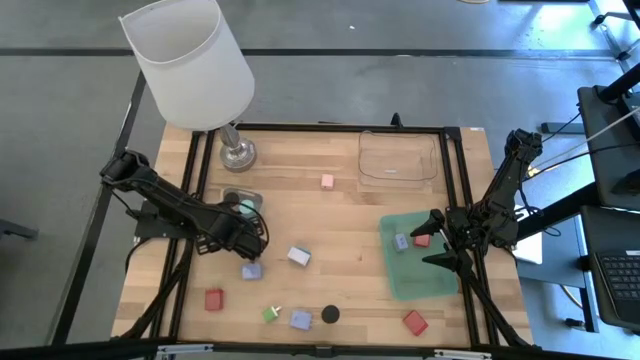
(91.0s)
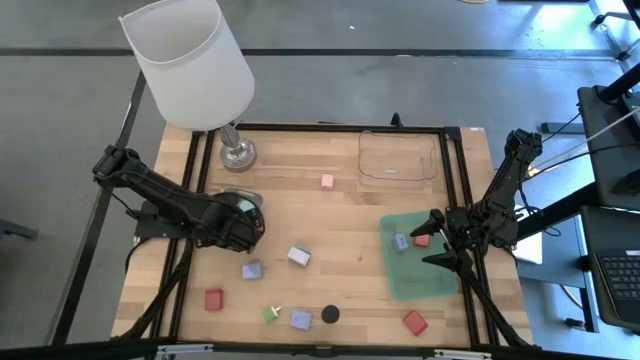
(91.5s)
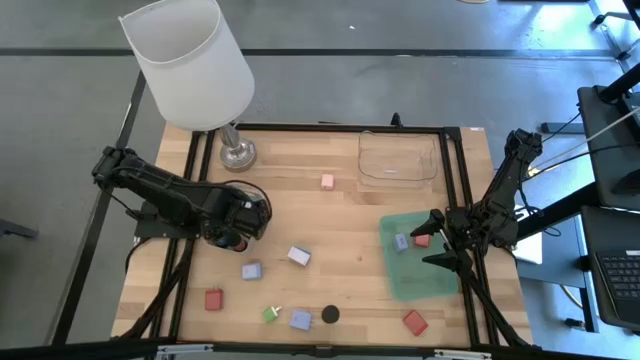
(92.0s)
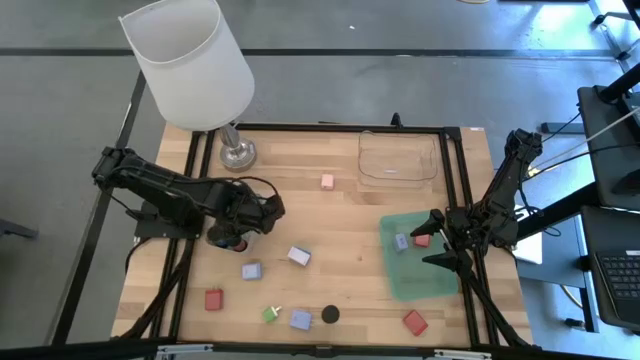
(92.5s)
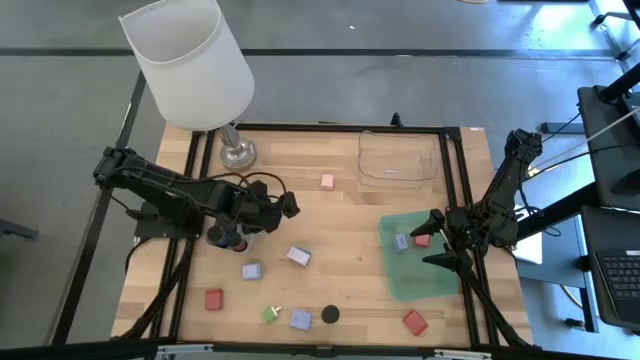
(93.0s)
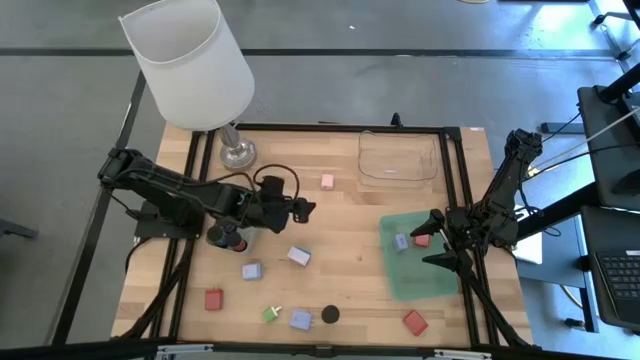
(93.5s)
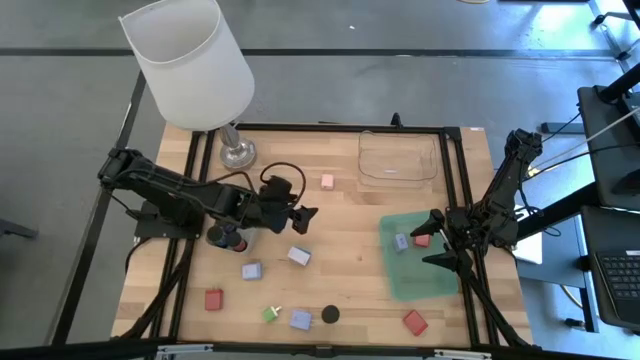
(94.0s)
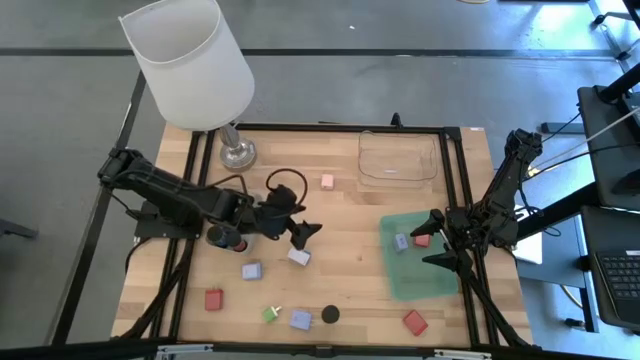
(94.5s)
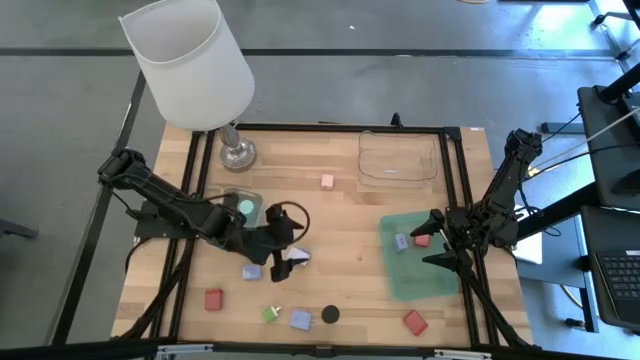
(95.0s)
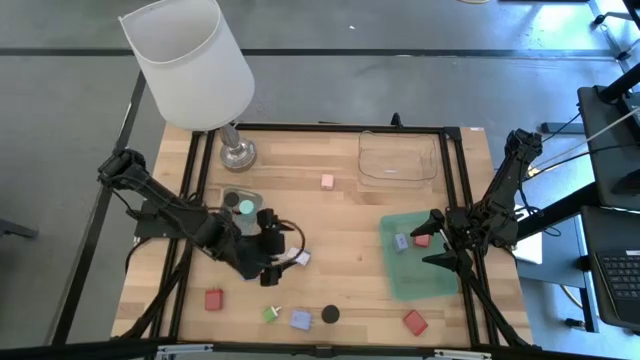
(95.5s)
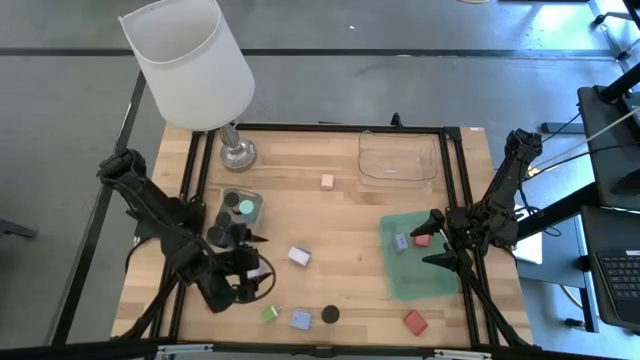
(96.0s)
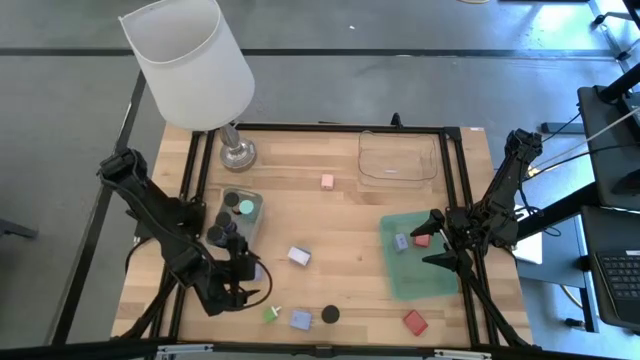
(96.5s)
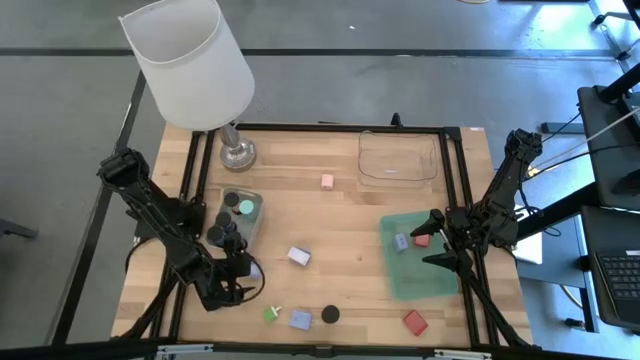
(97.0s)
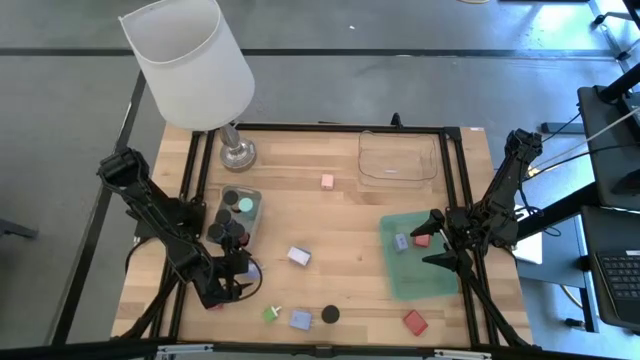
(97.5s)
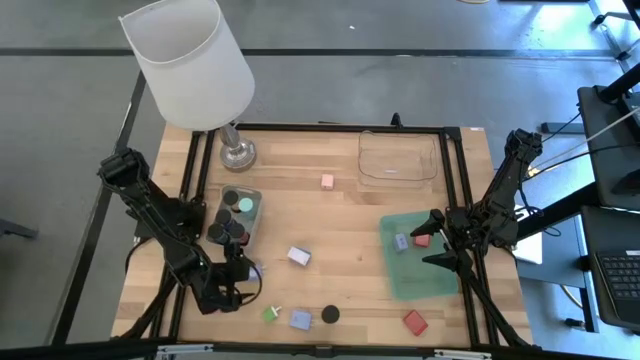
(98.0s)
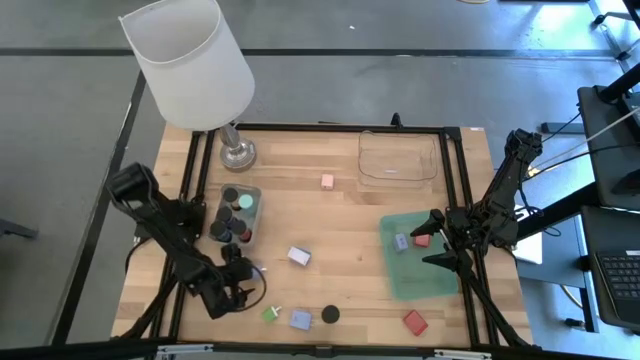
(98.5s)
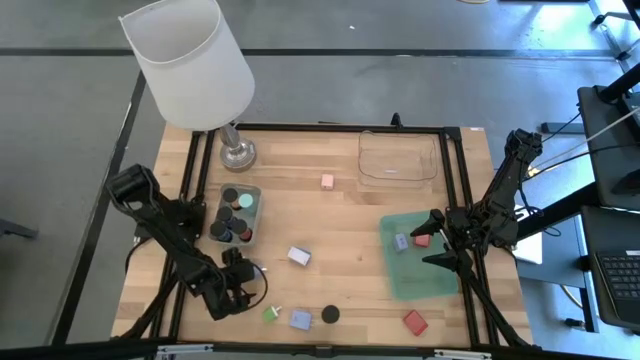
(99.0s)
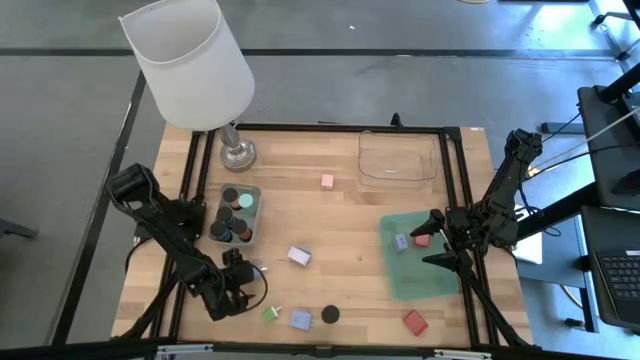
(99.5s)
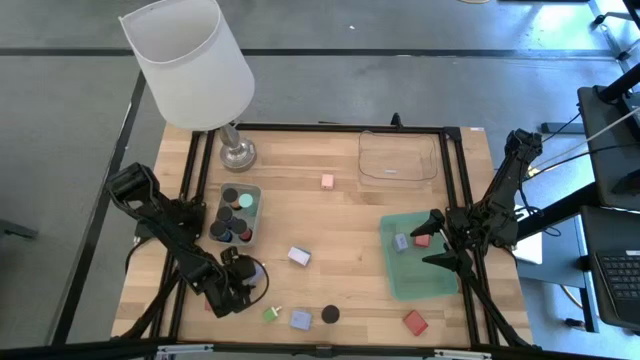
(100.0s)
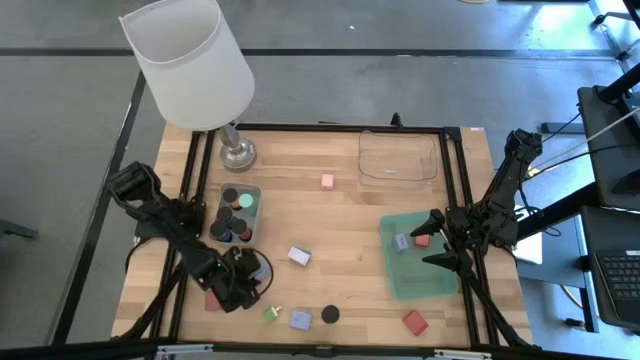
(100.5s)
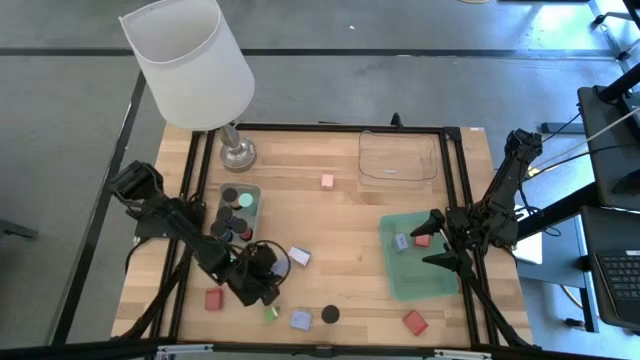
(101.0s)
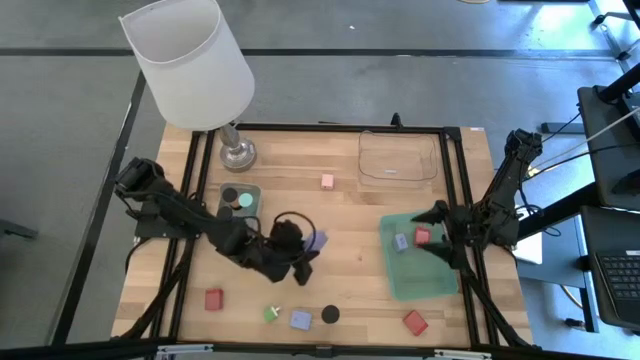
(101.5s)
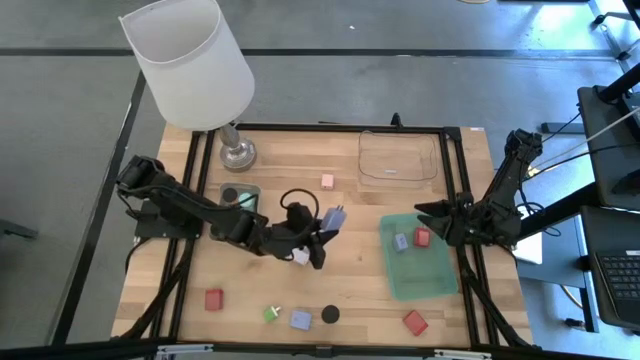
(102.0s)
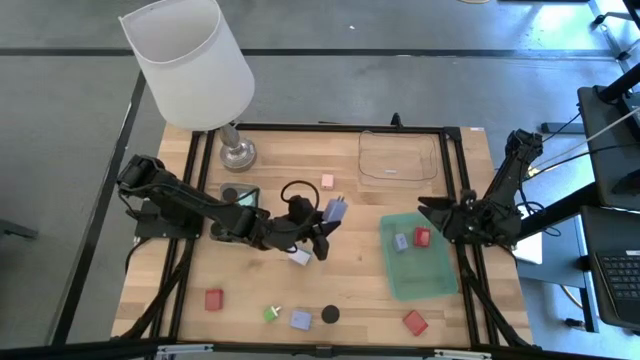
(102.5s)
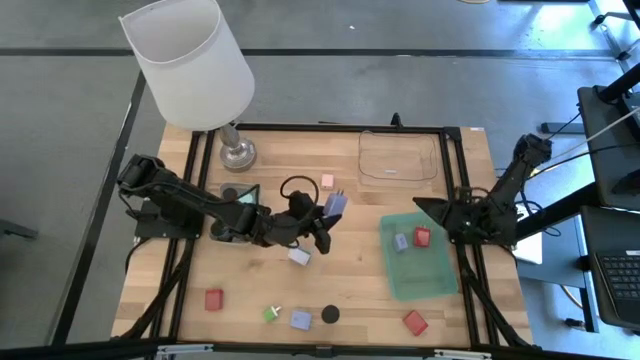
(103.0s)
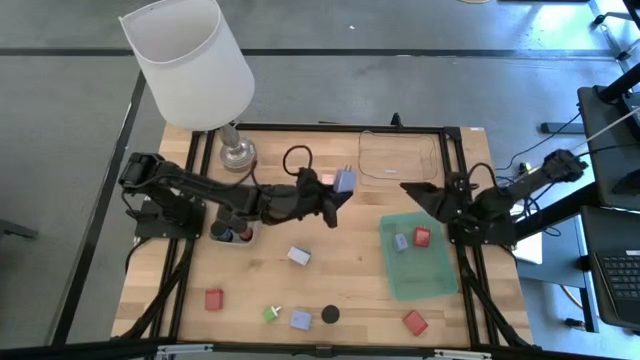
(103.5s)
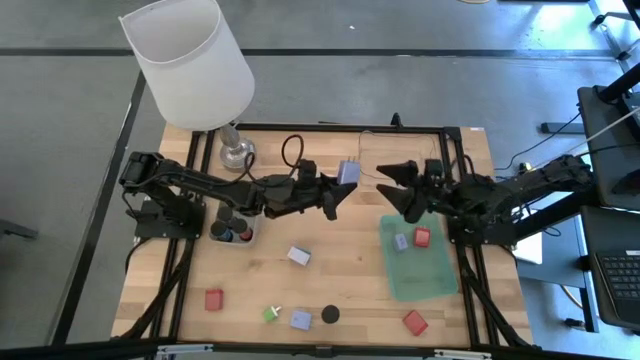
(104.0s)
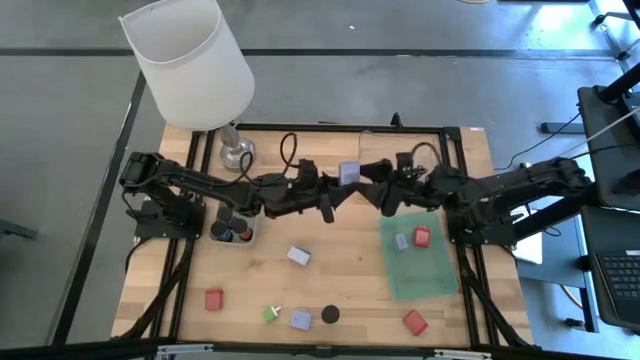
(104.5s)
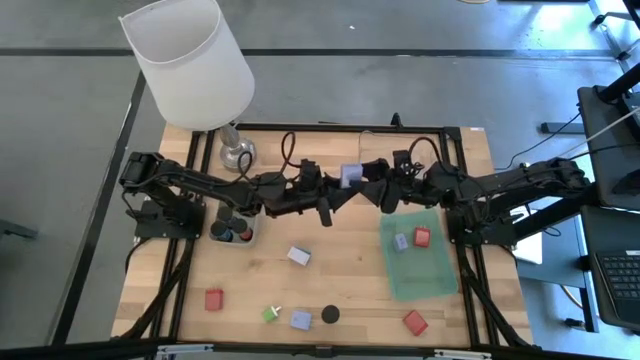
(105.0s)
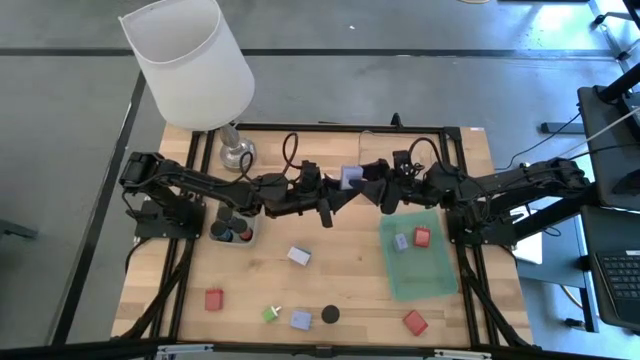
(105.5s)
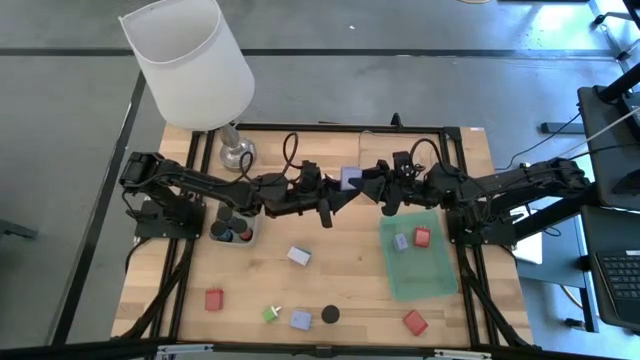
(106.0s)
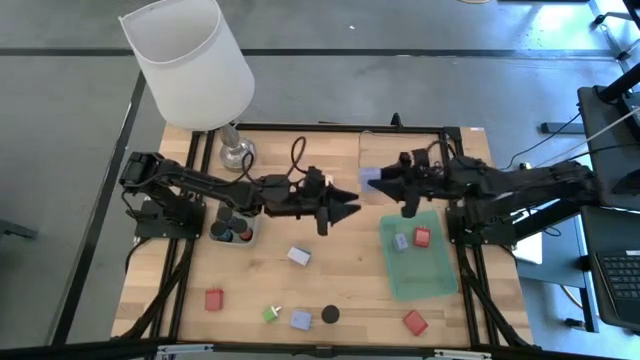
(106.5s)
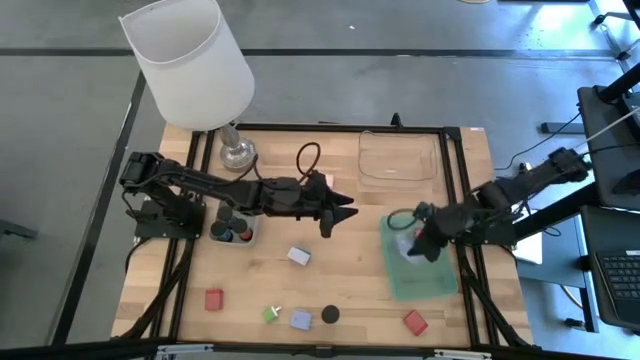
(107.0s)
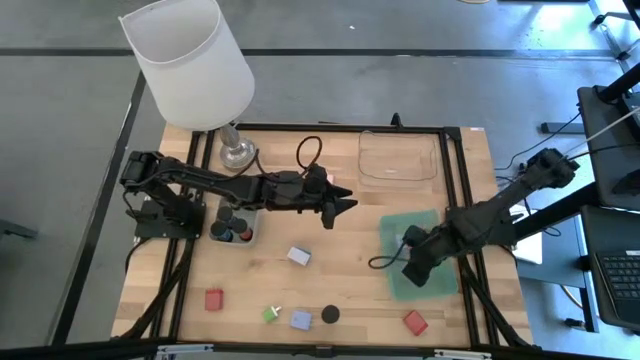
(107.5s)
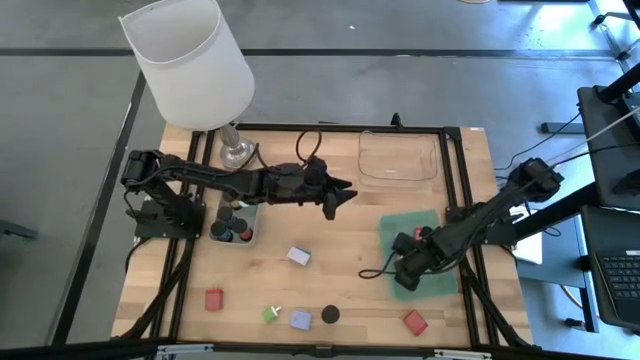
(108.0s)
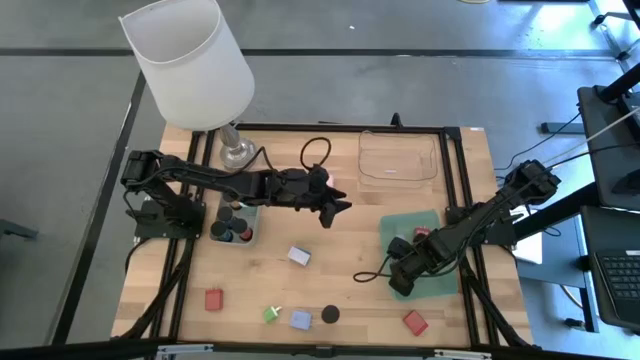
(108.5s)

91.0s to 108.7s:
Task: Pick & Place Office items
Put the top blue charger adapter into the green bin

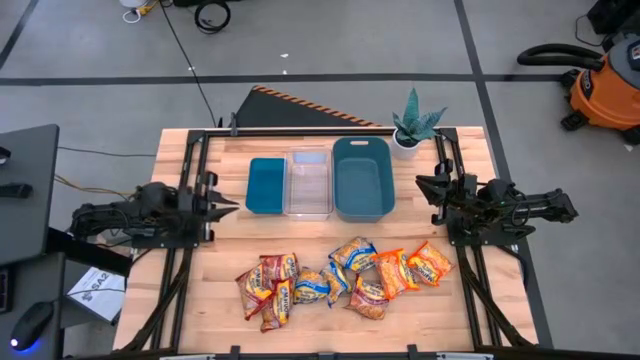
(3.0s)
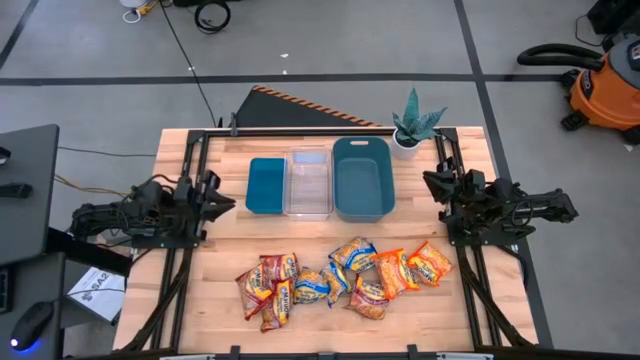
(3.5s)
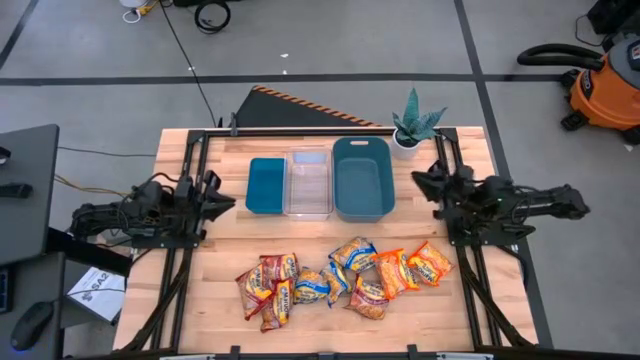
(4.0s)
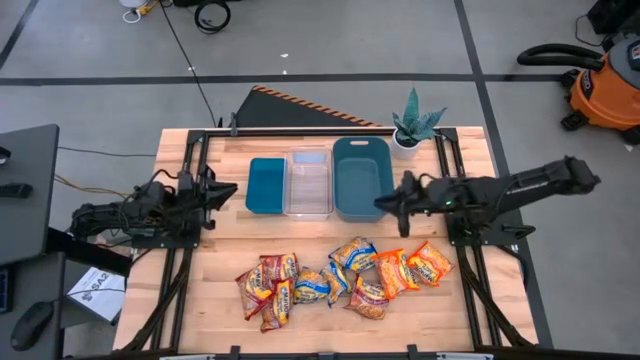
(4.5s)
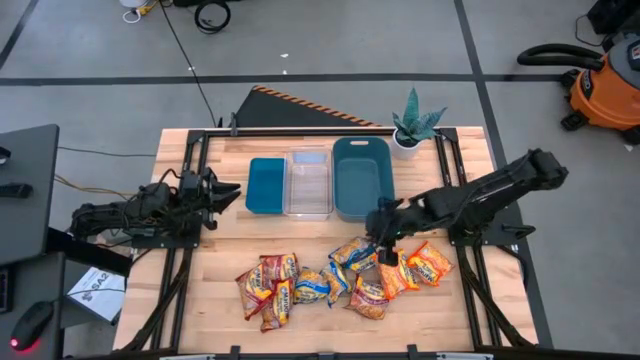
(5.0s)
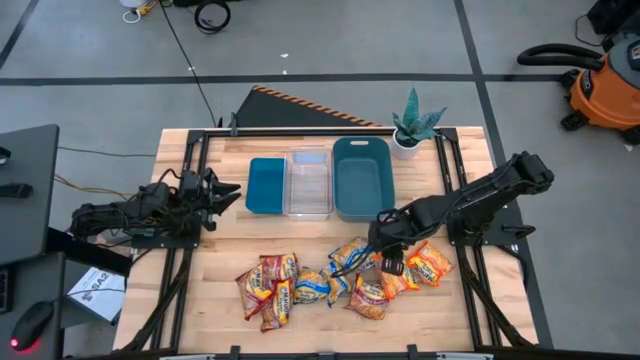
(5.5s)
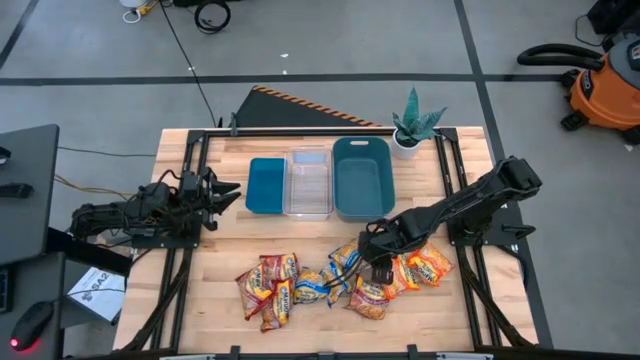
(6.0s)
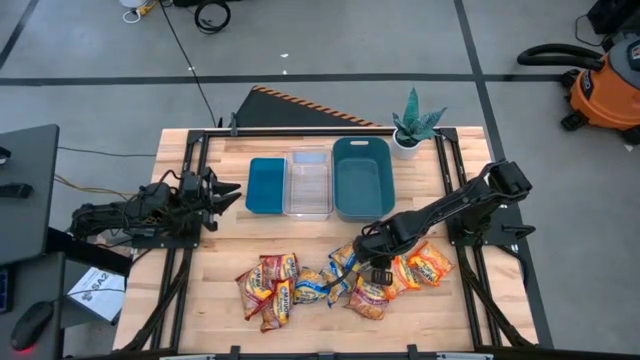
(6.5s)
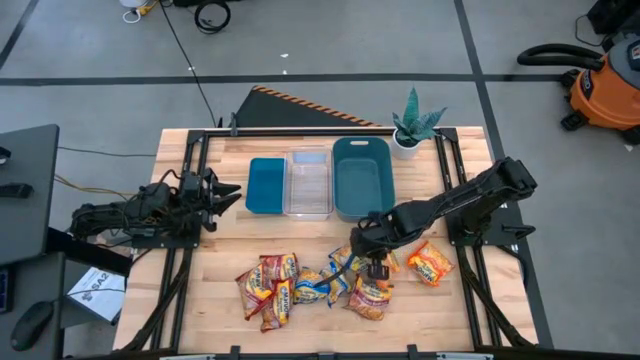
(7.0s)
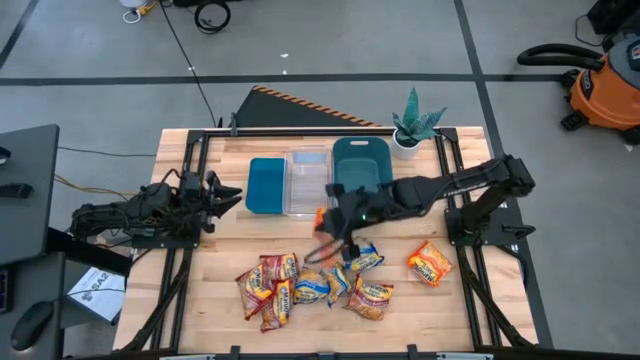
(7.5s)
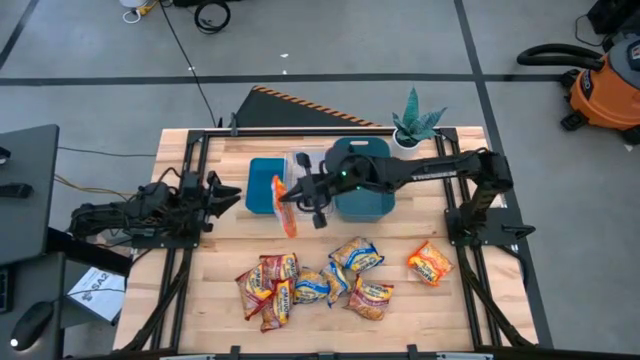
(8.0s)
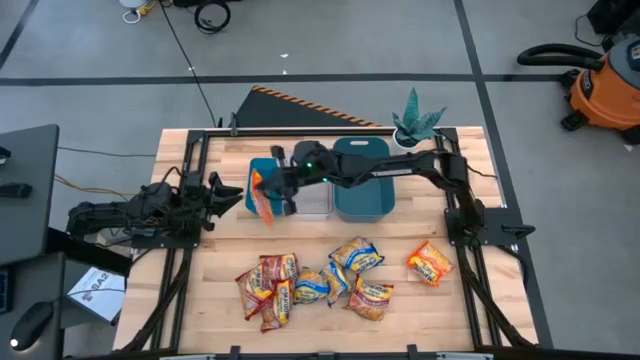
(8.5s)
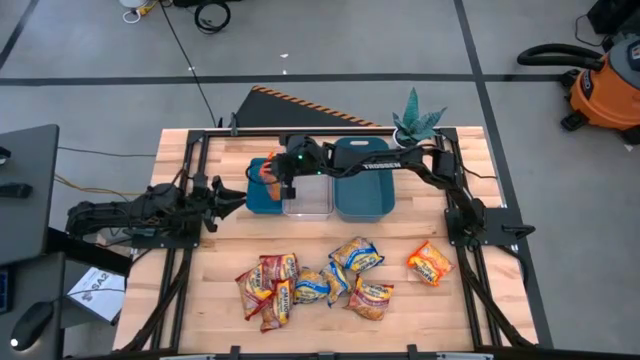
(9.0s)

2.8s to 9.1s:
Task: Sort Maruchan noodles
Put the orange noodle pack into the blue bin
